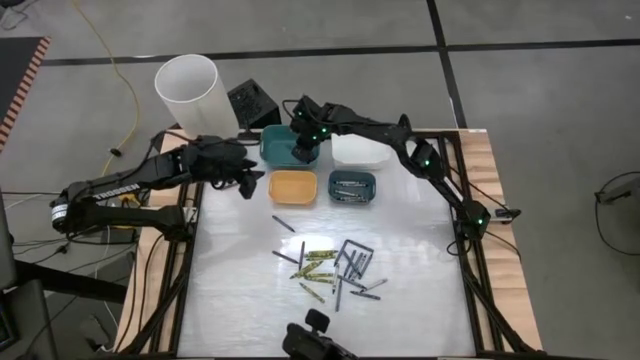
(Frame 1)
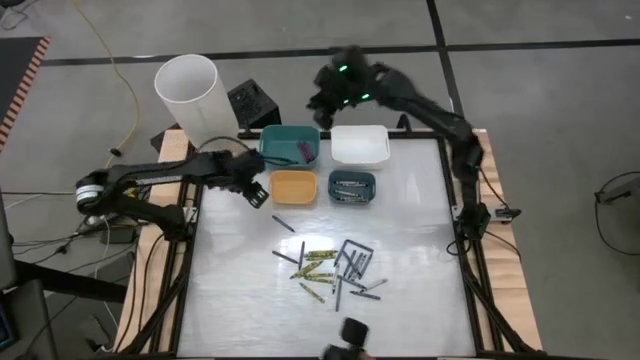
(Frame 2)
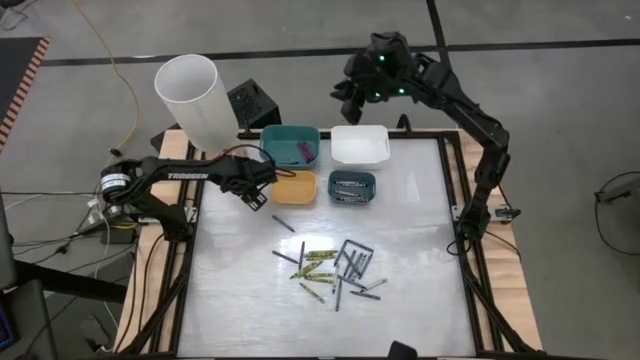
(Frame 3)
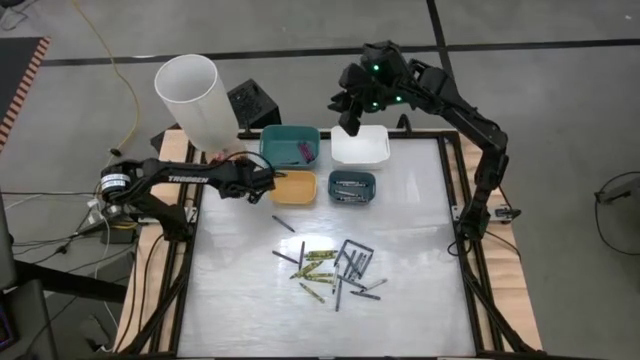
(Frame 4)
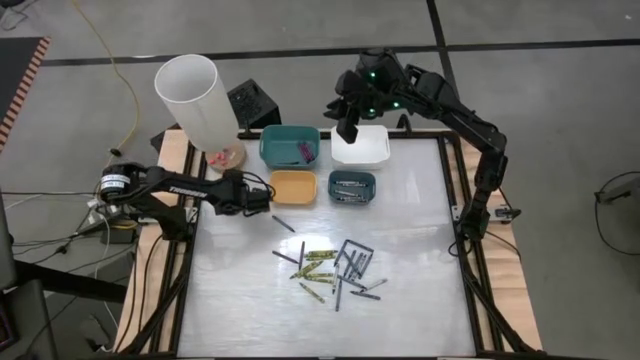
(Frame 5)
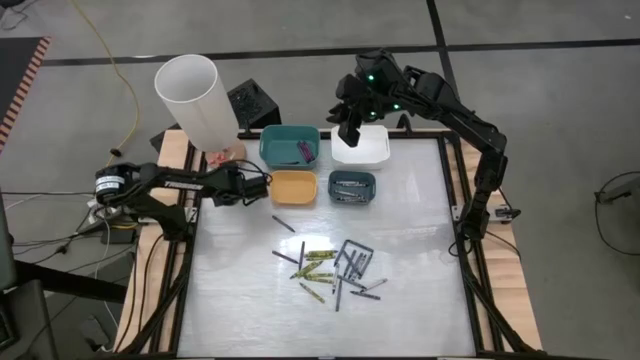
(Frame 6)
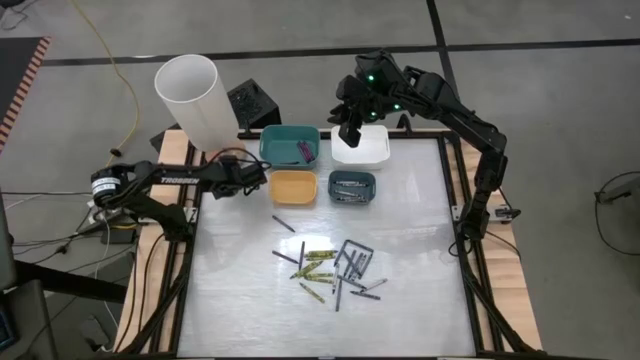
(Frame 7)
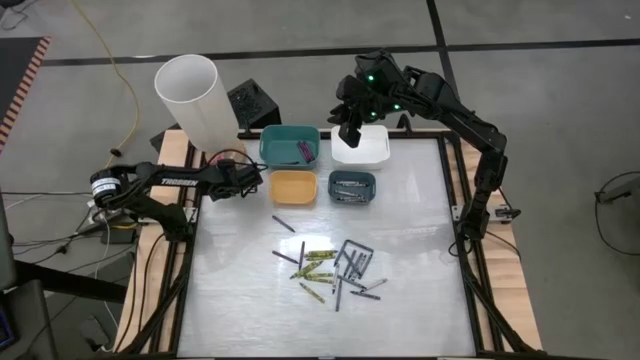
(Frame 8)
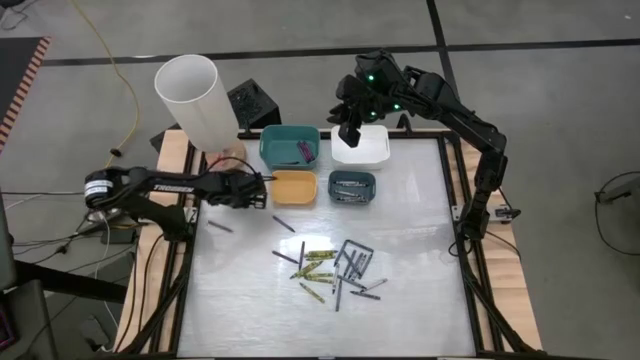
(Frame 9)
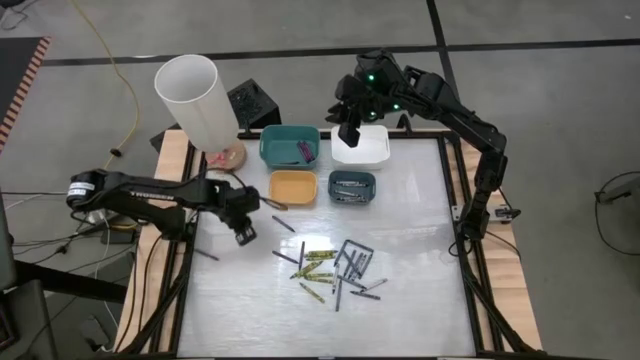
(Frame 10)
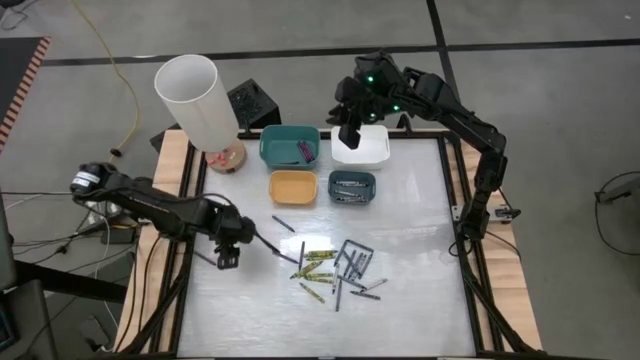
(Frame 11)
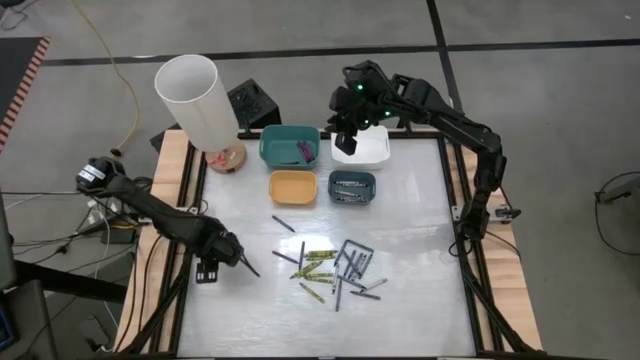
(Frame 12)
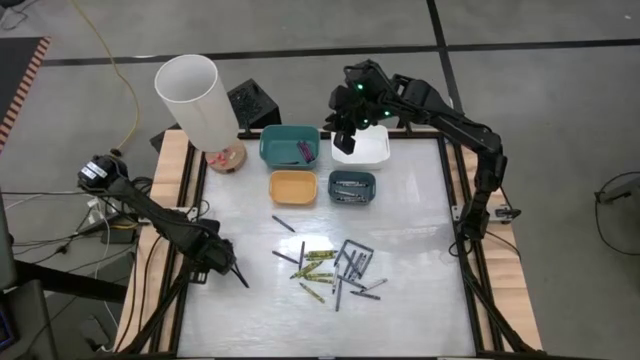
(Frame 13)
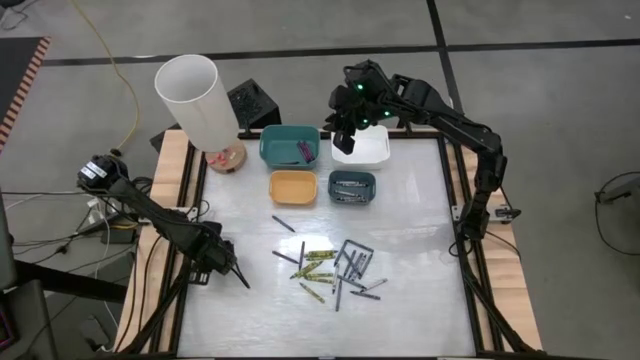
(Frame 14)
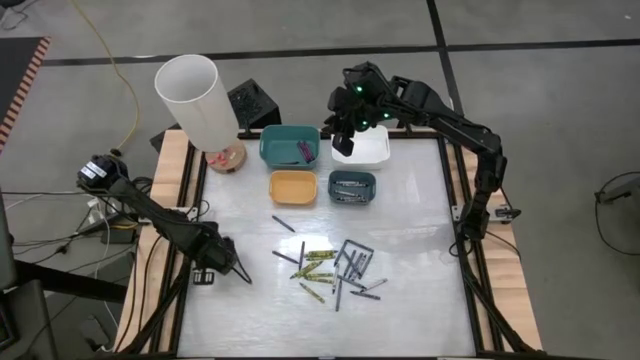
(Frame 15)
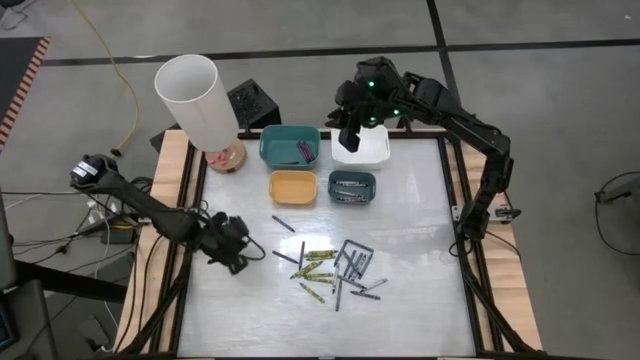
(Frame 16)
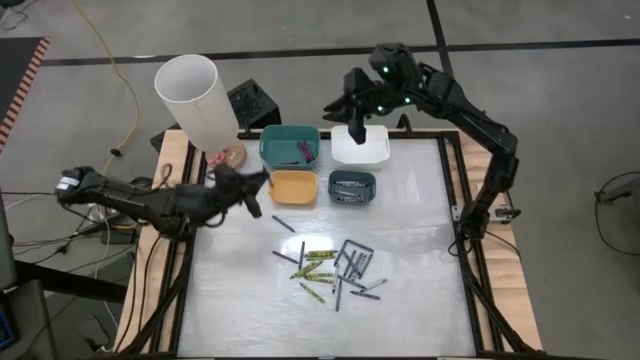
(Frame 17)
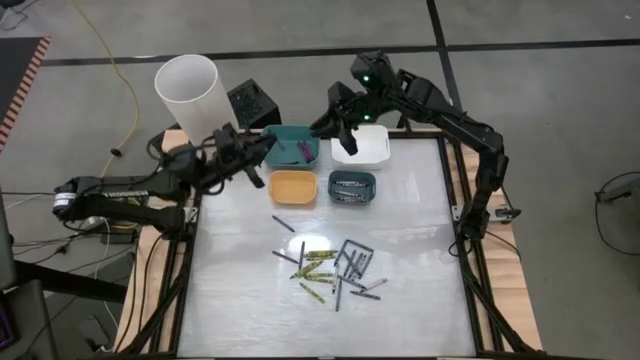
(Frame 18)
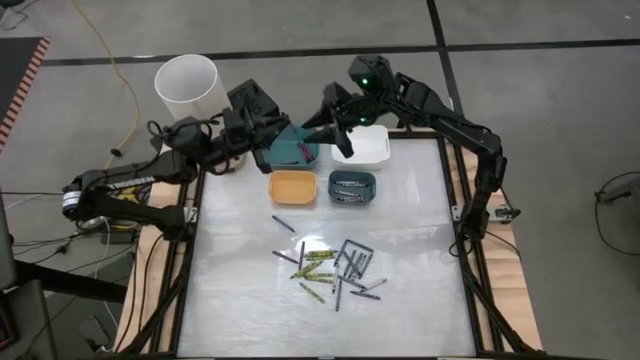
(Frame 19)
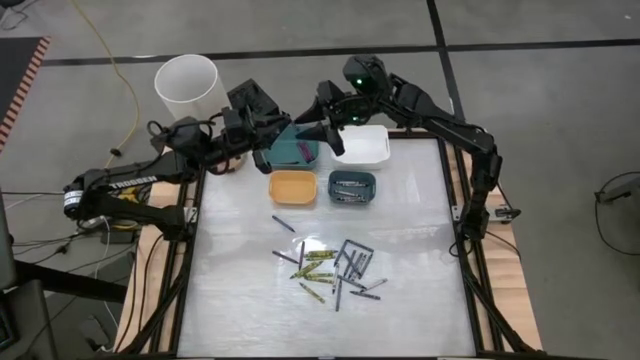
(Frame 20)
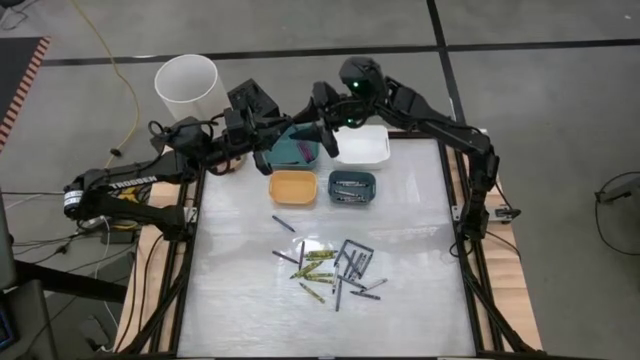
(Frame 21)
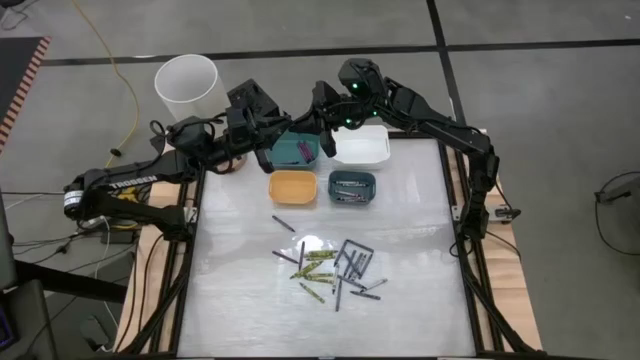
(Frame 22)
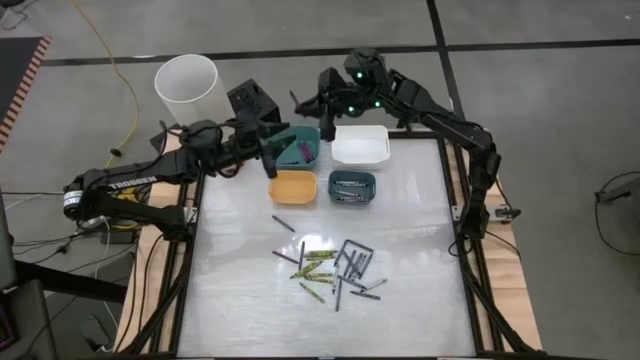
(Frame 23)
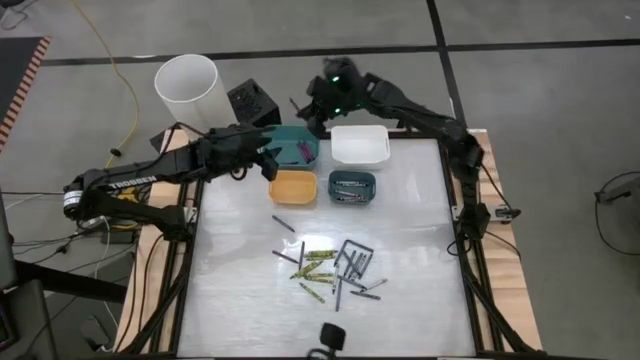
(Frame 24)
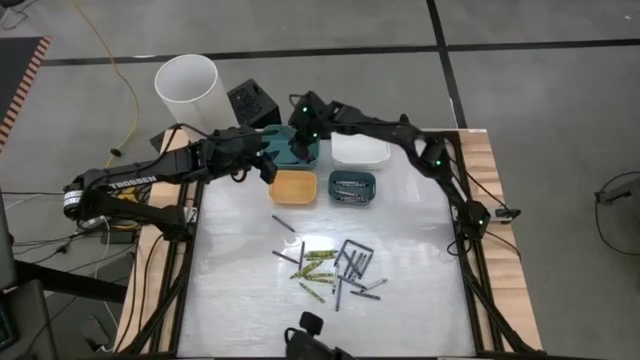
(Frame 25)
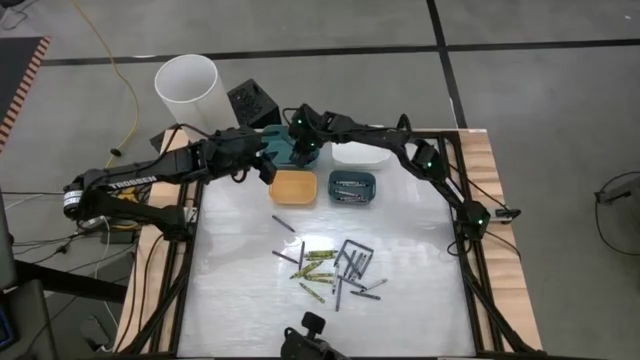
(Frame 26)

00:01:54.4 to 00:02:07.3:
Task: Sort crayons
Put the violet crayon into the green bin

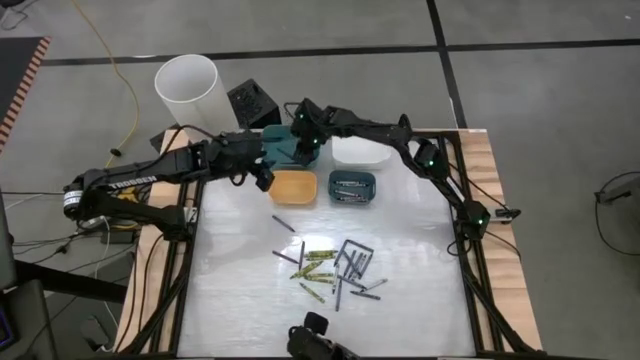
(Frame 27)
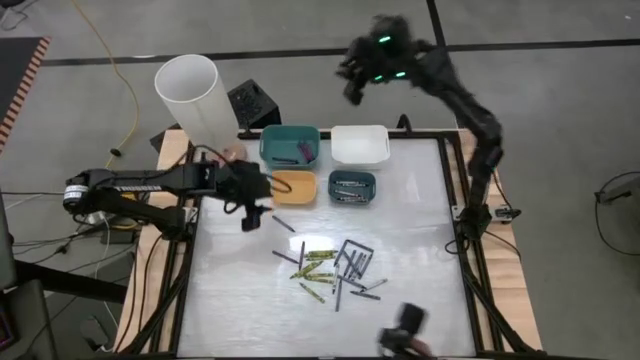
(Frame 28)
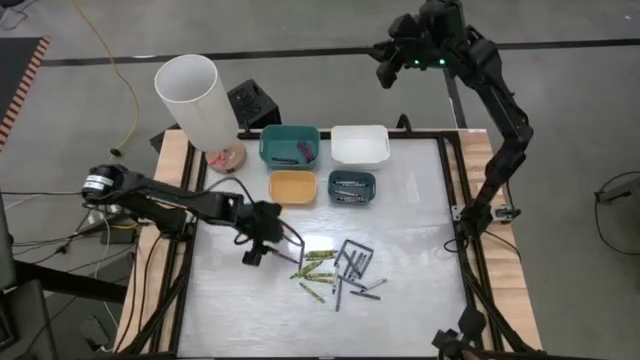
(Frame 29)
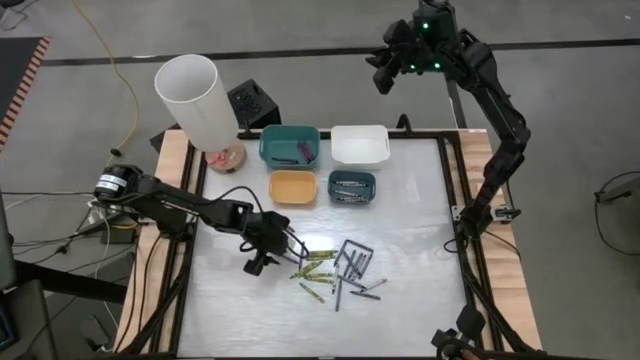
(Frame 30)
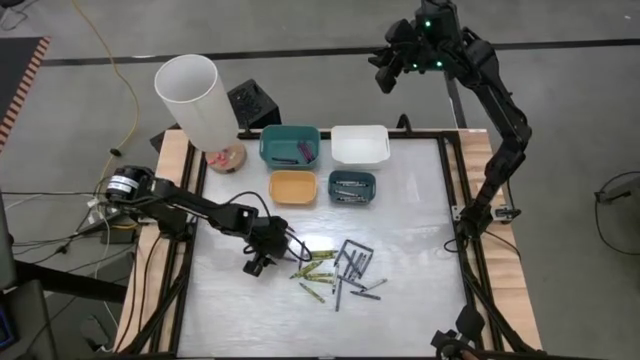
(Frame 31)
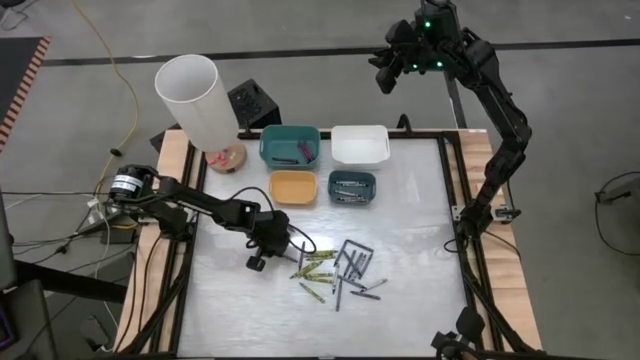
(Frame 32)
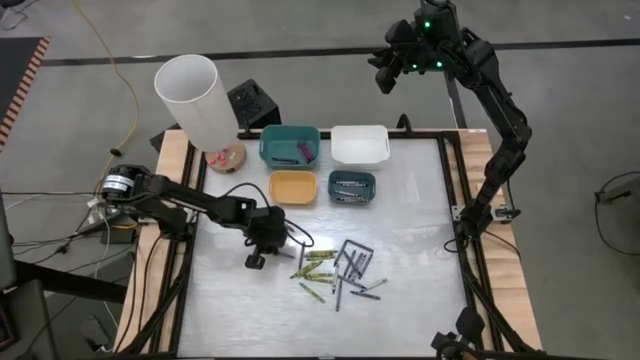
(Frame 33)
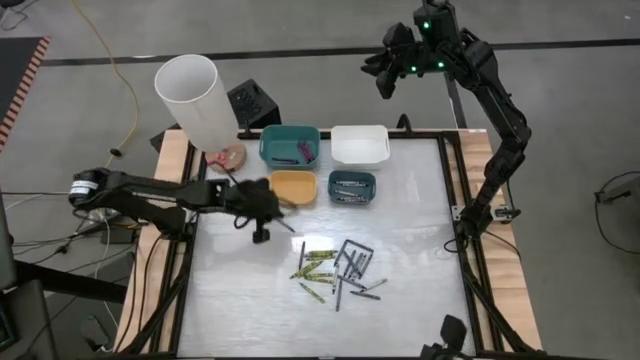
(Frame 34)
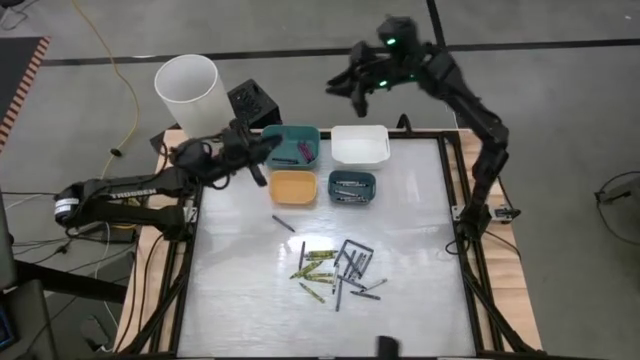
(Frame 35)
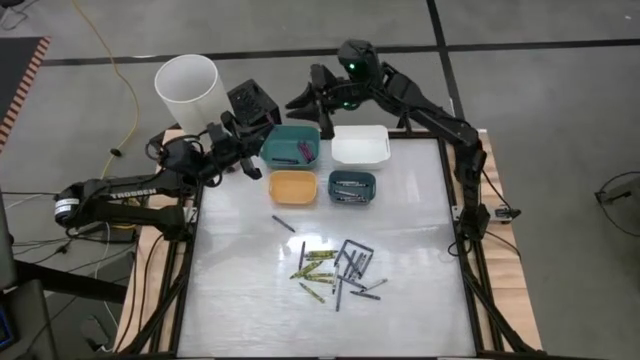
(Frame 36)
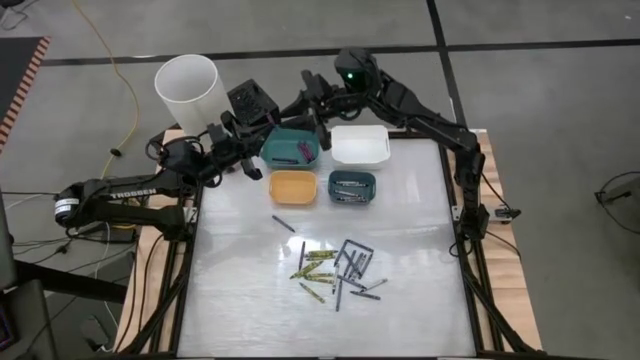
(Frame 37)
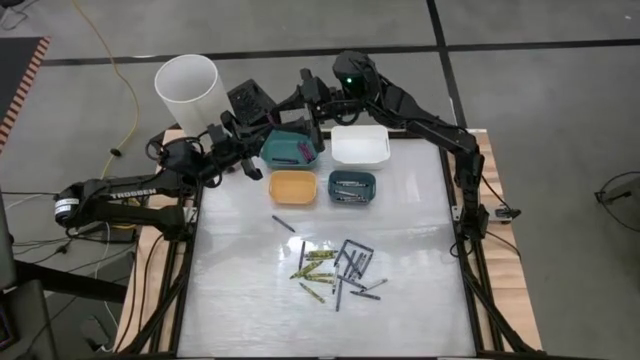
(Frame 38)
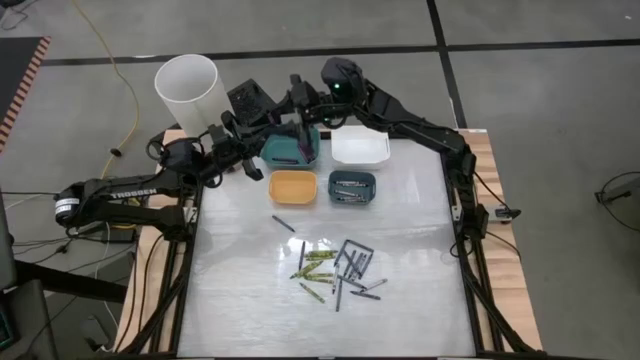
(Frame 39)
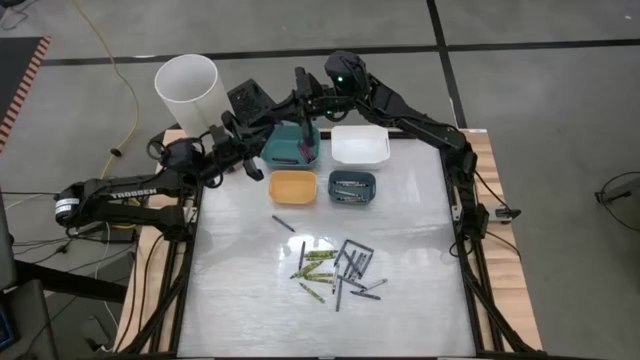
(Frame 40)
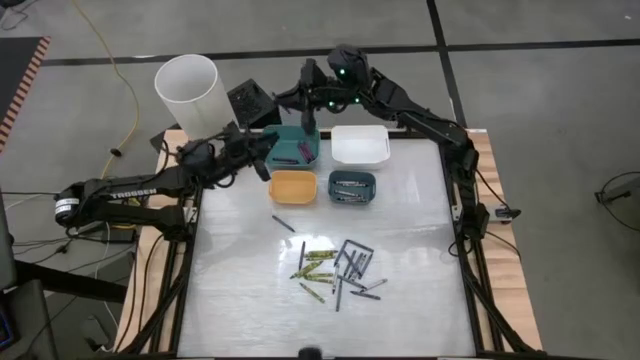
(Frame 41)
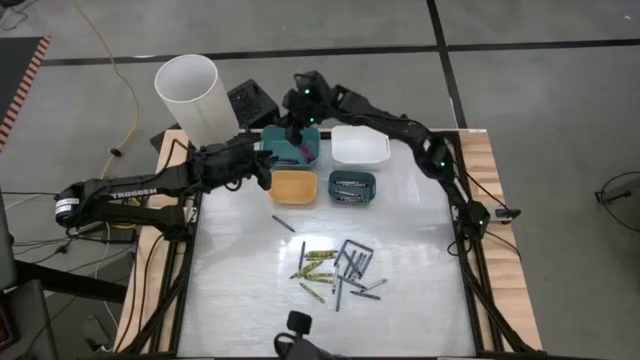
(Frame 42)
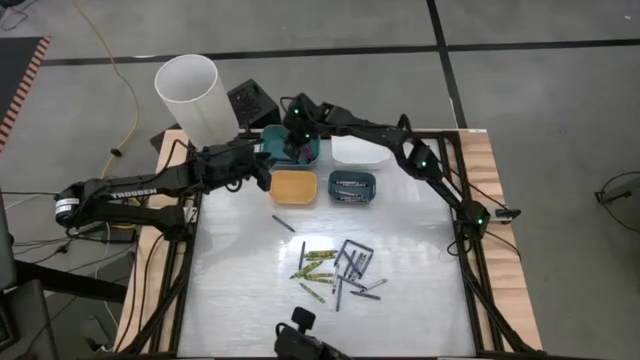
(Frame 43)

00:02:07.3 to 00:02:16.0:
Put the violet crayon into the green bin
